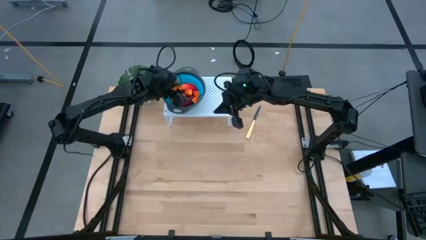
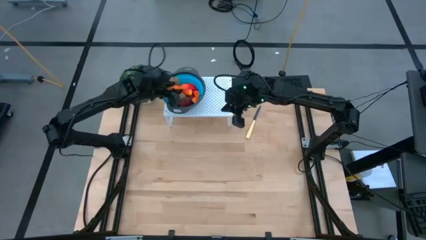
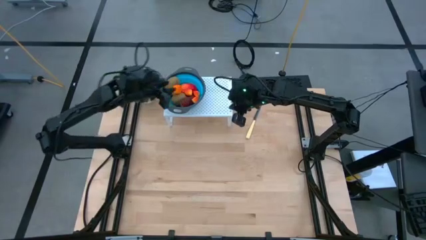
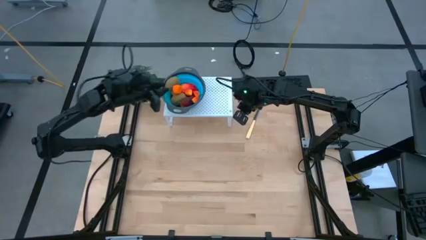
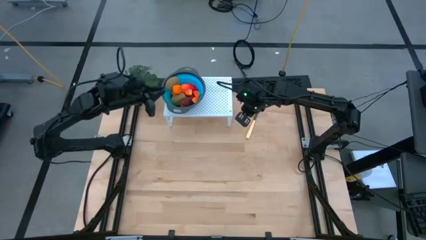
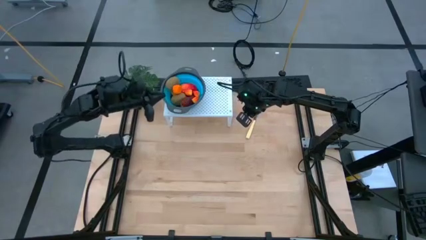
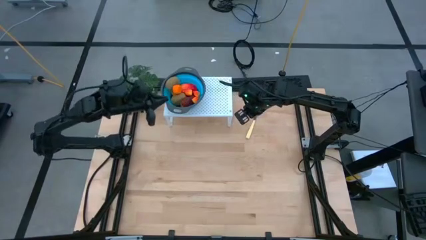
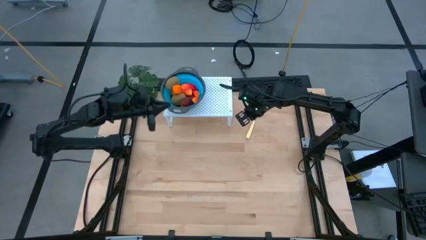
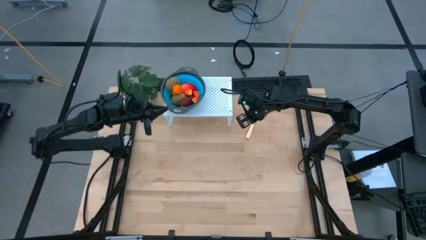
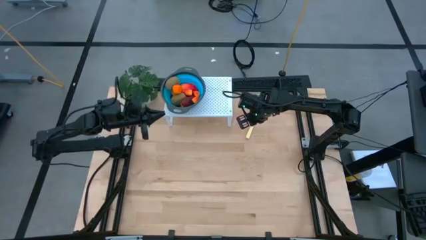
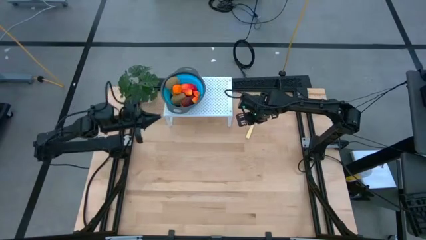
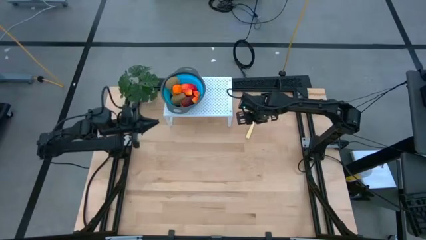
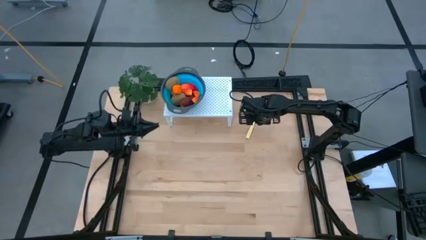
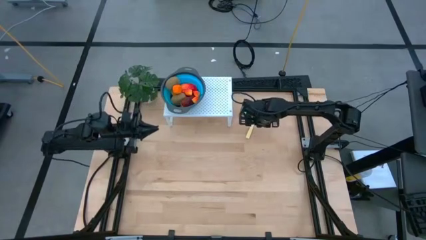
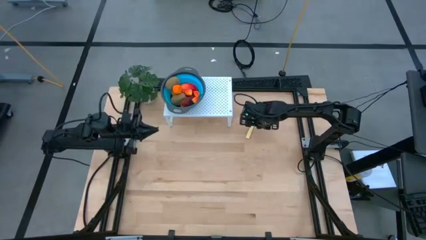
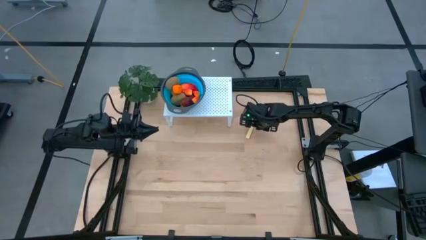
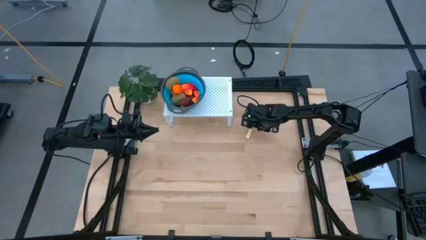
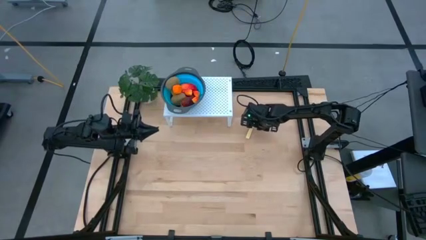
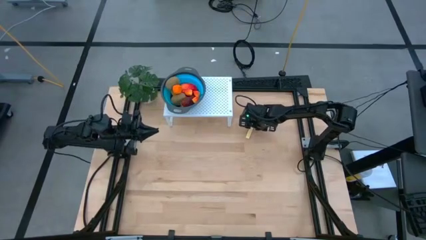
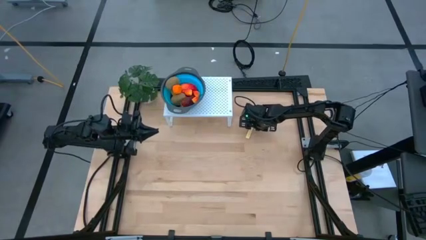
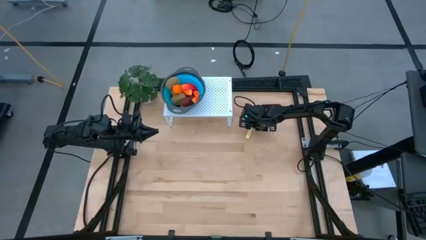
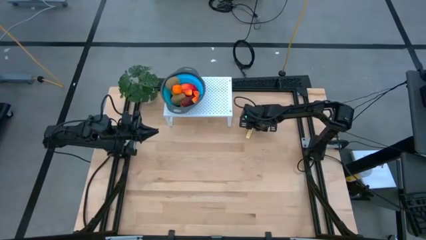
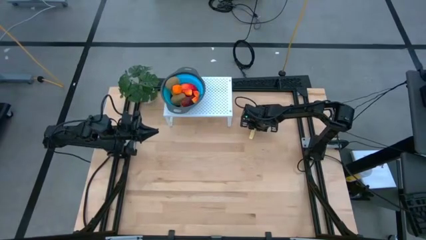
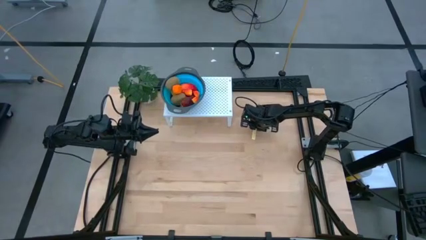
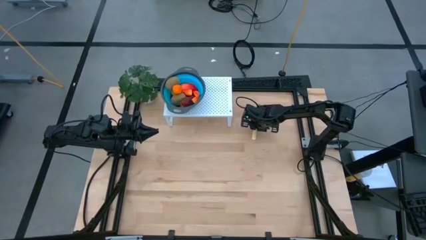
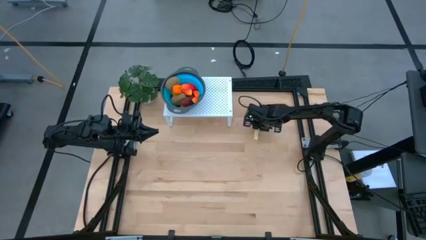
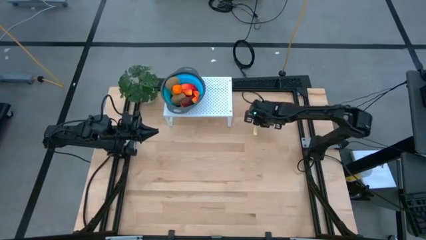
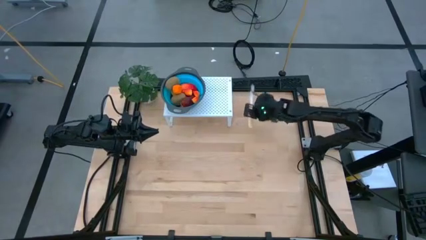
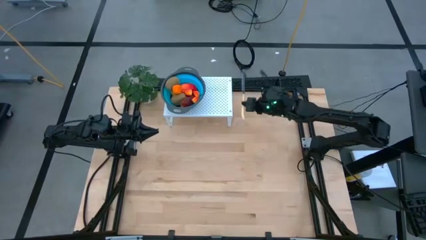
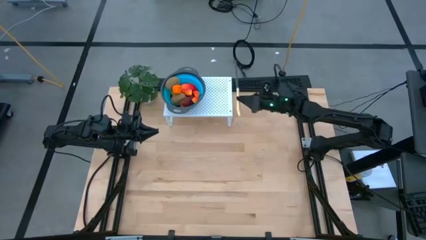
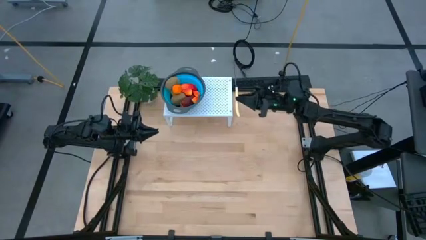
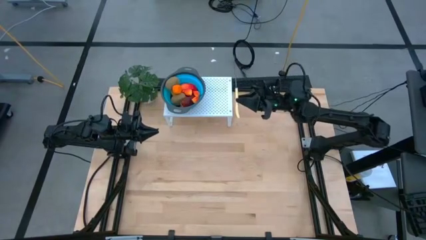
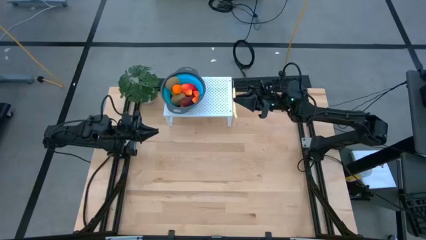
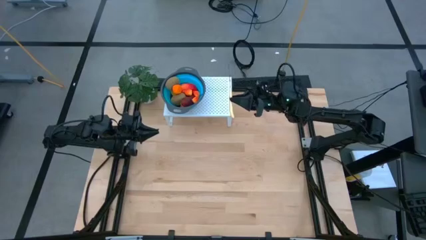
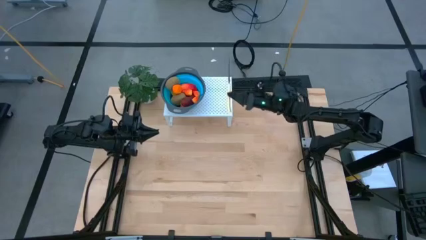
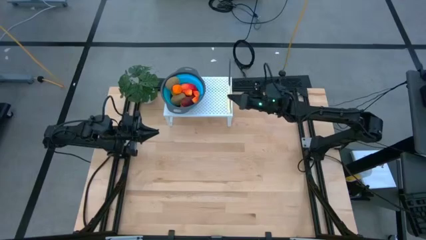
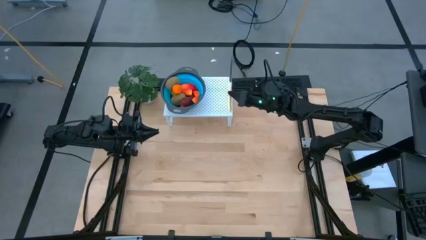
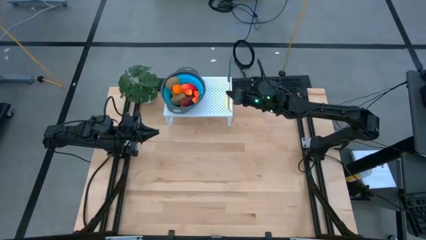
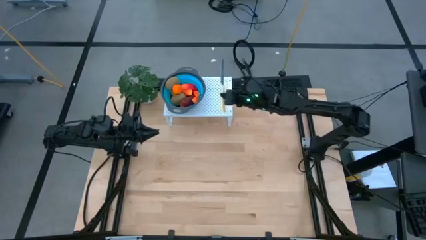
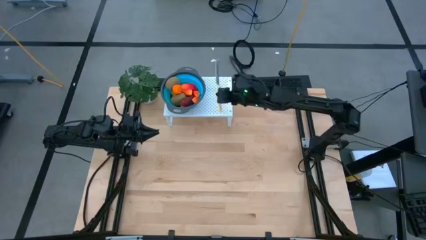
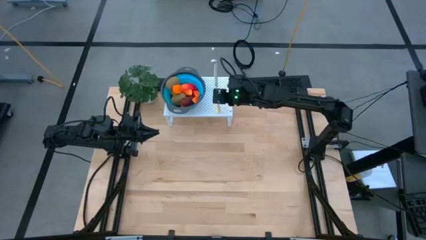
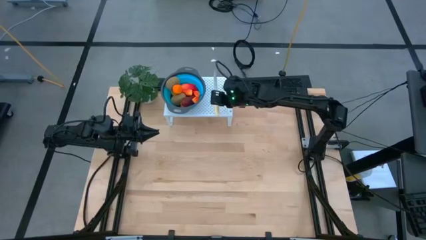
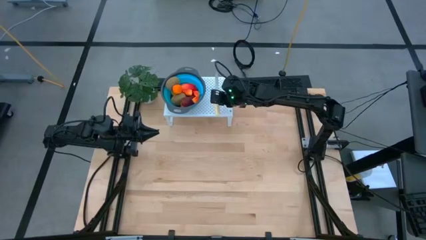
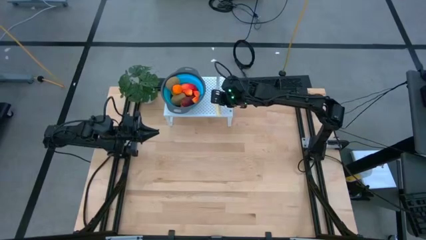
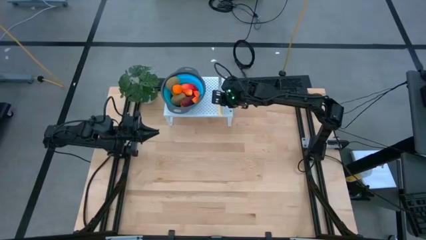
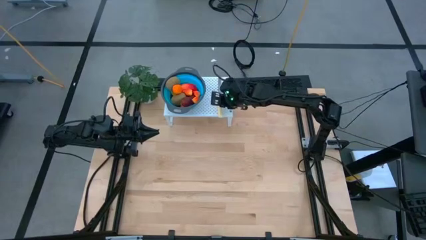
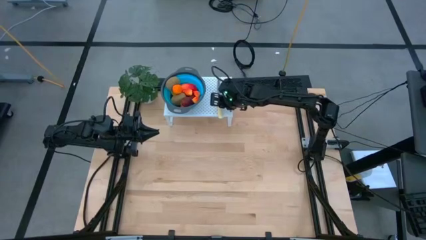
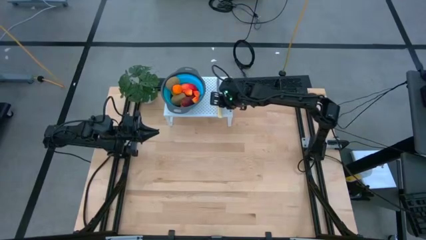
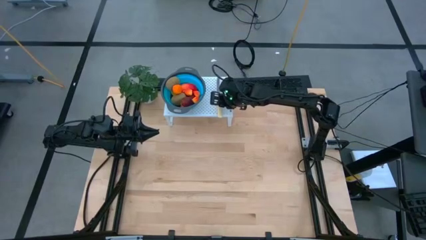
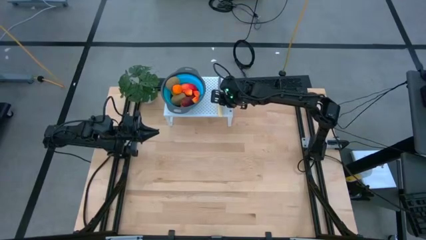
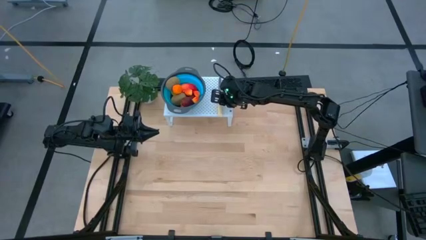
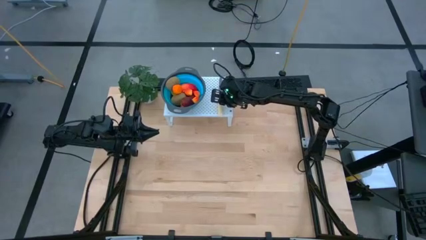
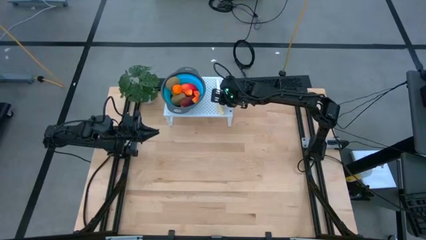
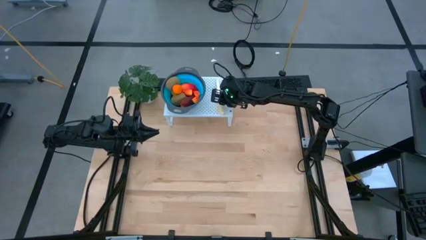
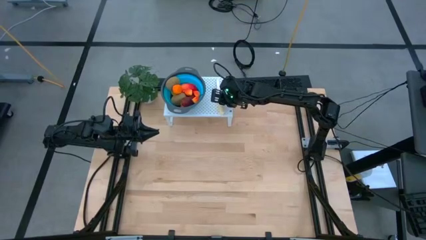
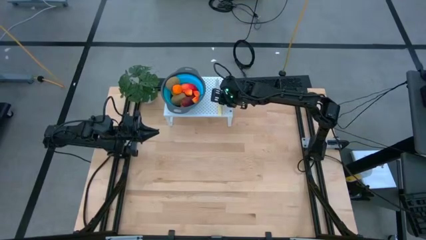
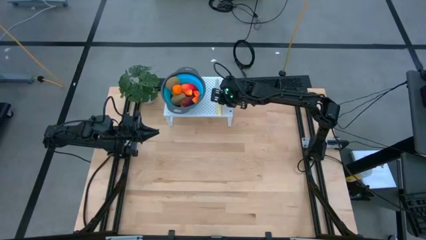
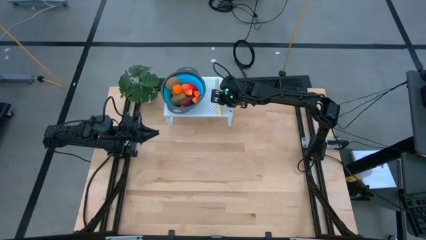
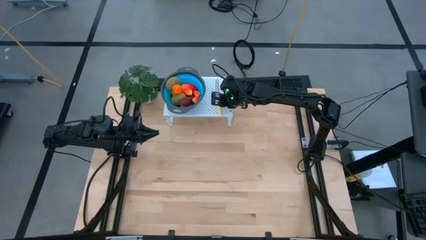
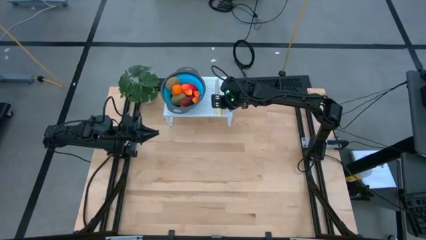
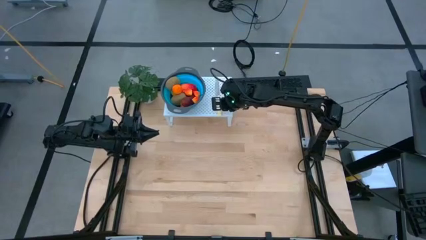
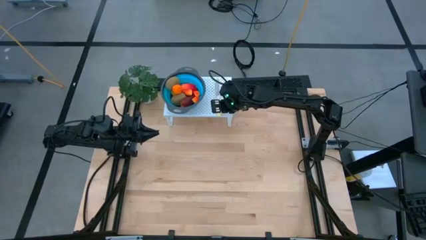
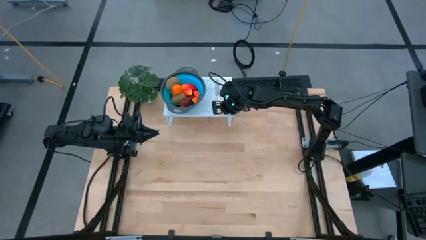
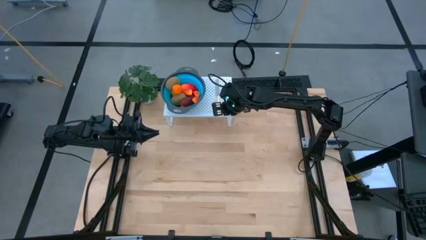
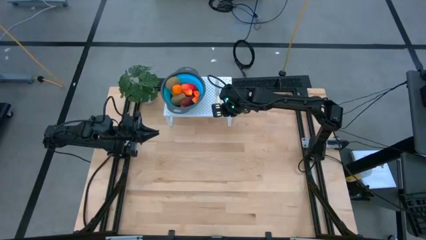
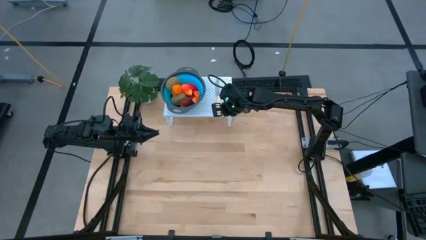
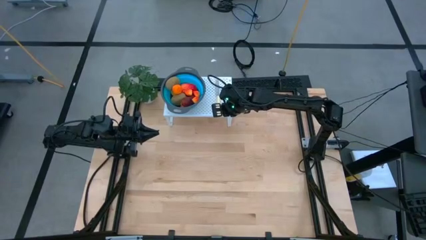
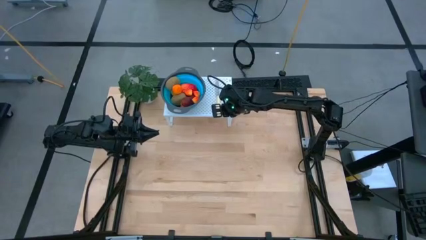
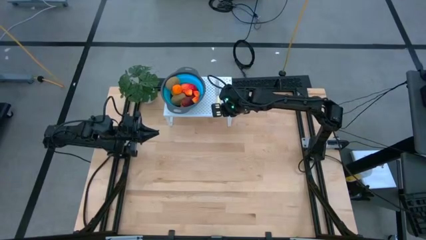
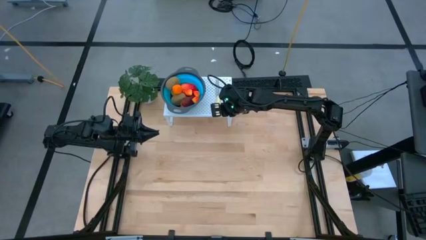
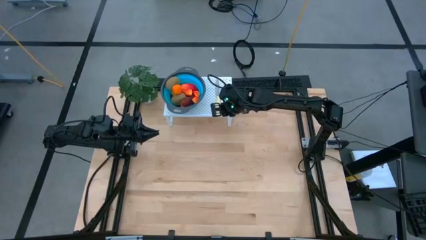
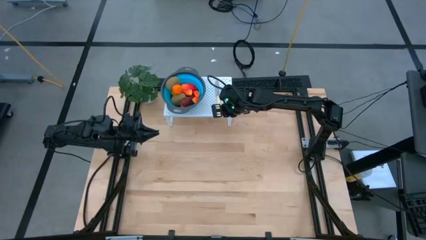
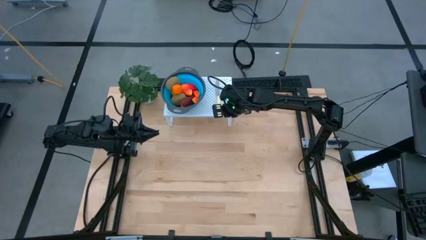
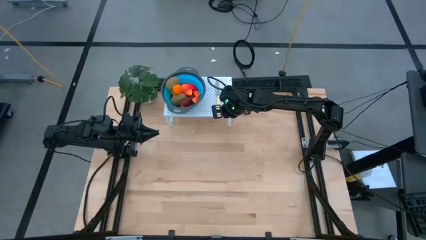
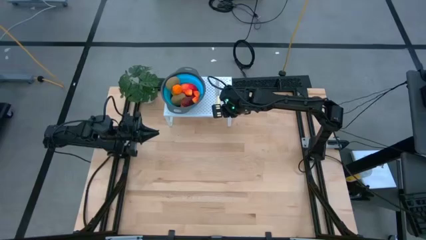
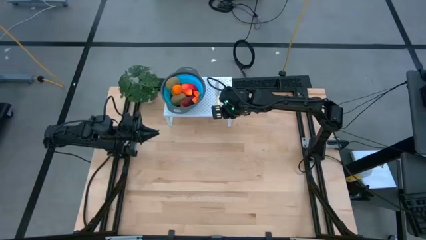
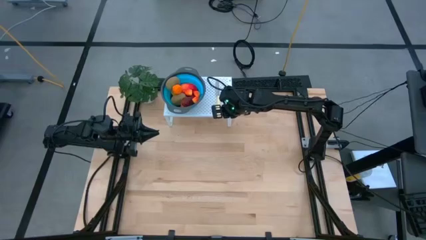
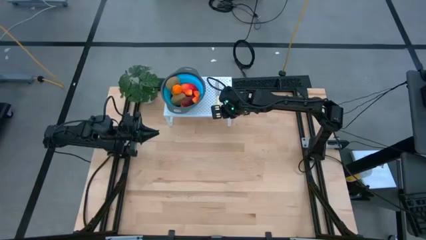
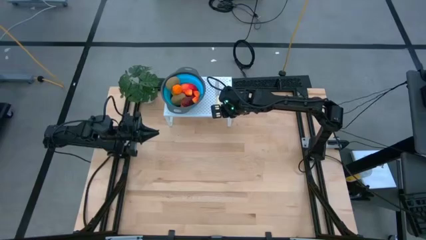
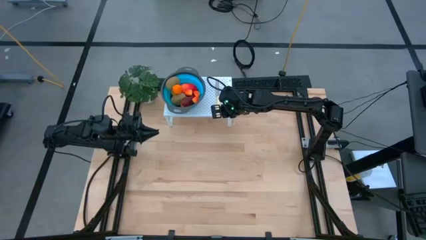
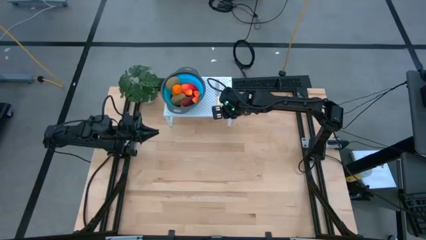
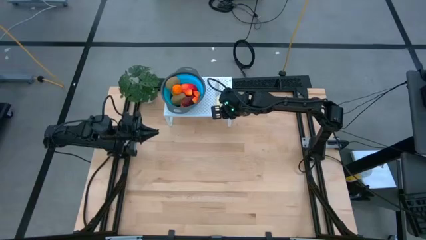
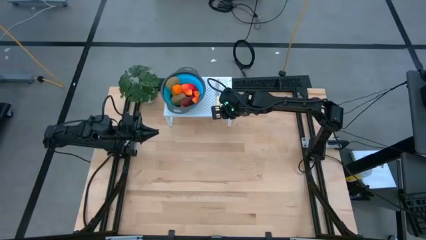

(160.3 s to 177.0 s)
Task: Pick & Place Fruit
Put the yellow table knife on the shelf
